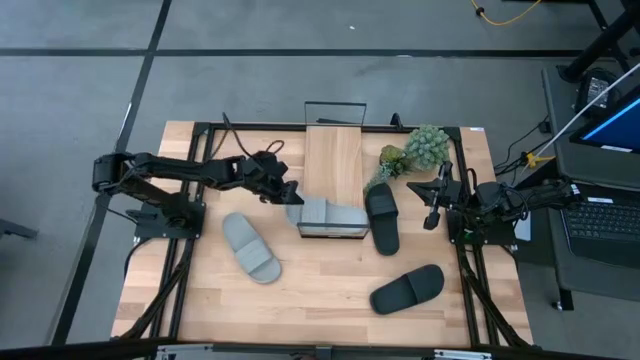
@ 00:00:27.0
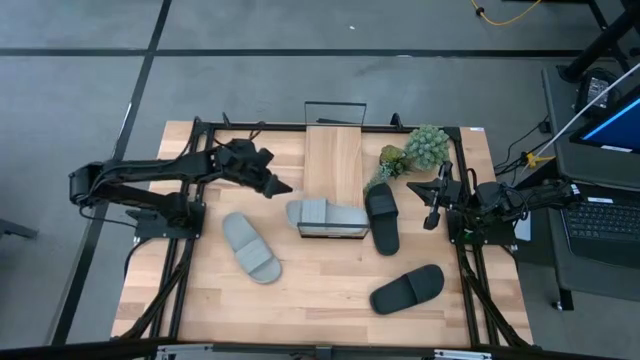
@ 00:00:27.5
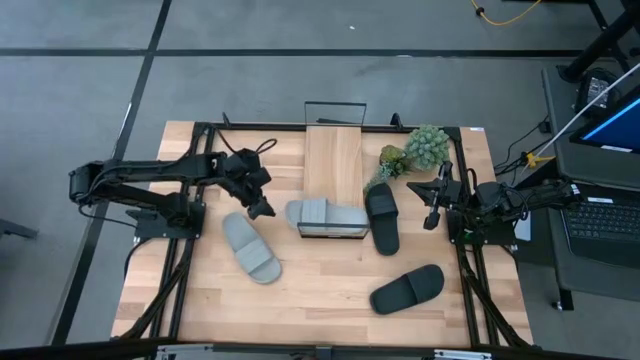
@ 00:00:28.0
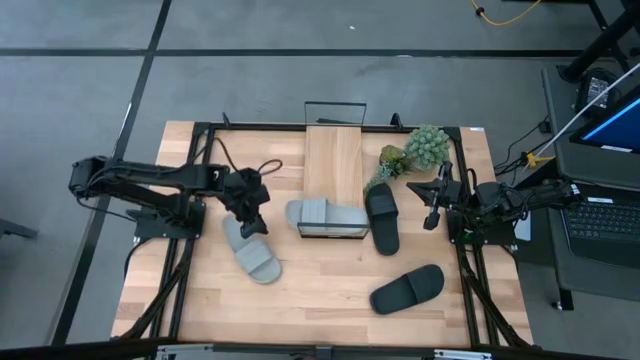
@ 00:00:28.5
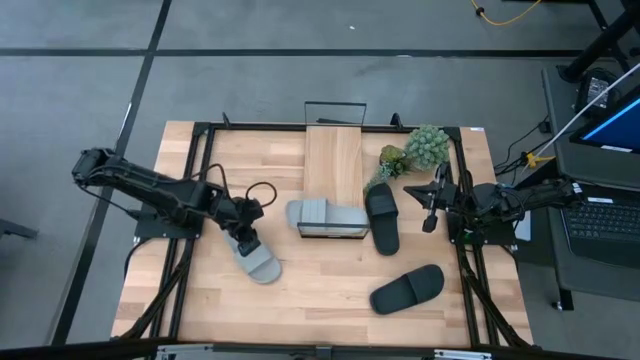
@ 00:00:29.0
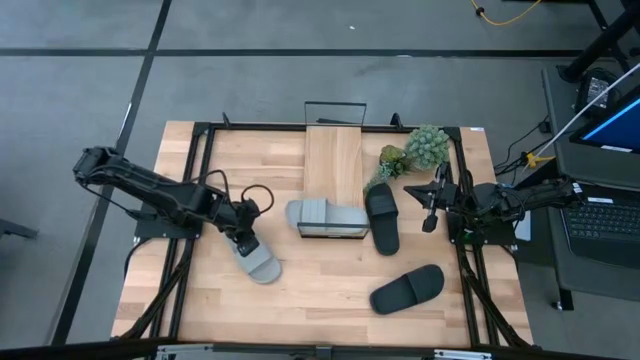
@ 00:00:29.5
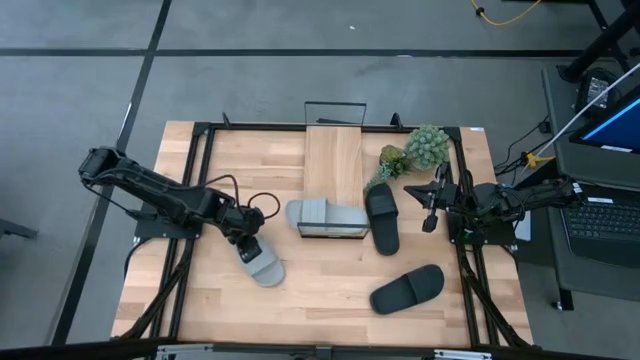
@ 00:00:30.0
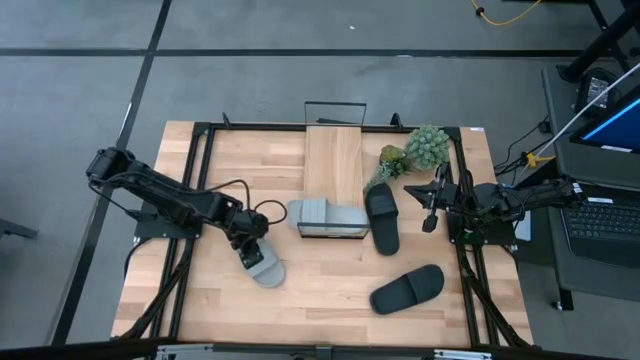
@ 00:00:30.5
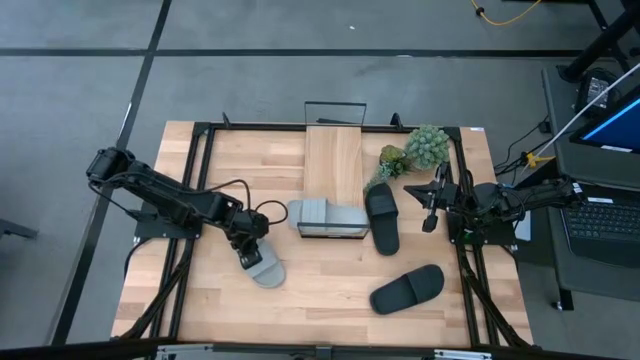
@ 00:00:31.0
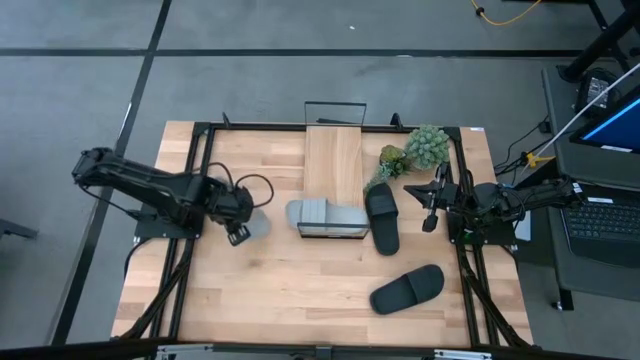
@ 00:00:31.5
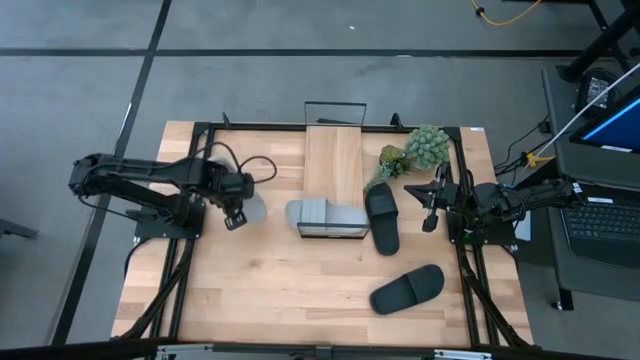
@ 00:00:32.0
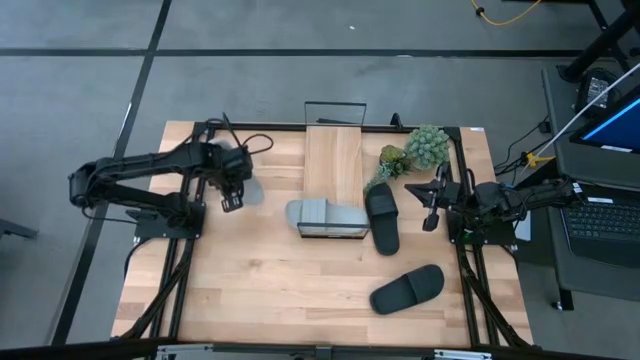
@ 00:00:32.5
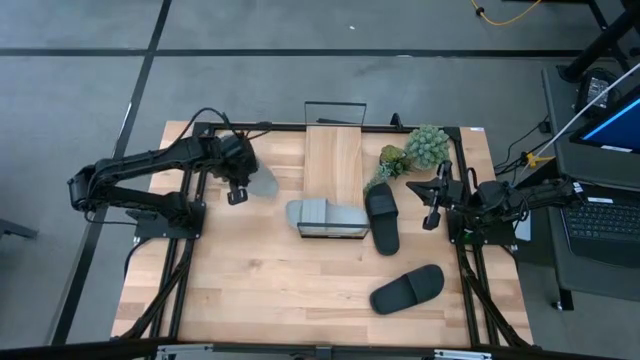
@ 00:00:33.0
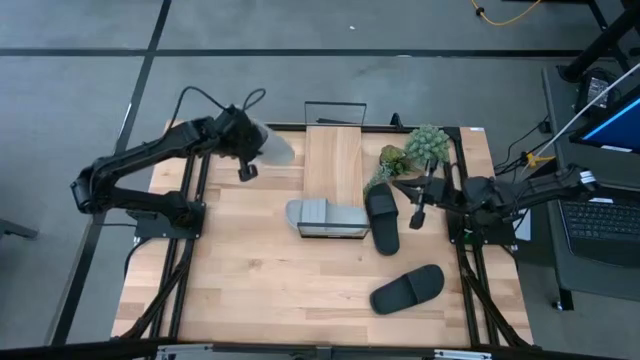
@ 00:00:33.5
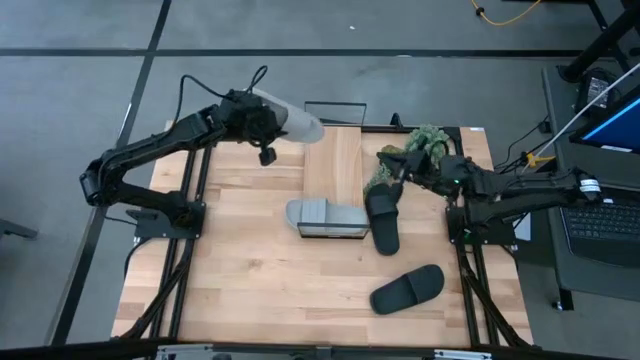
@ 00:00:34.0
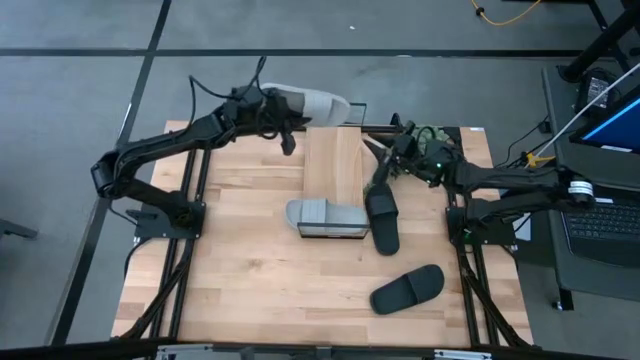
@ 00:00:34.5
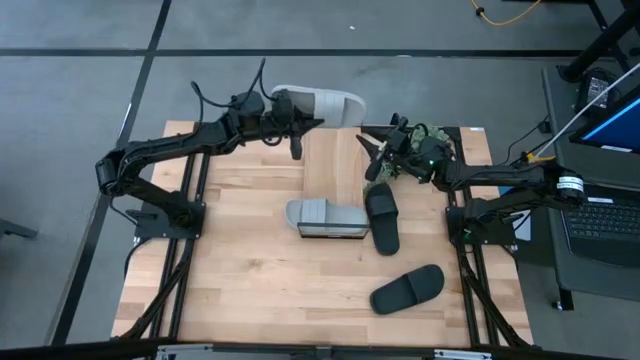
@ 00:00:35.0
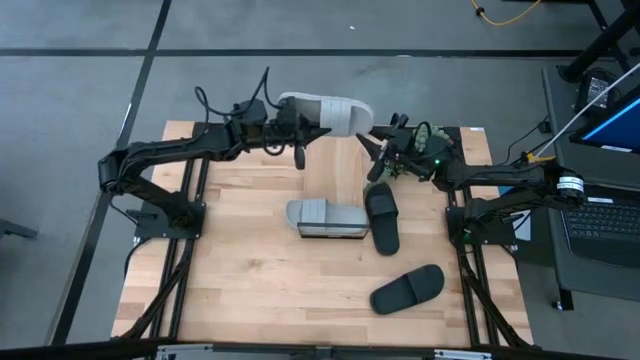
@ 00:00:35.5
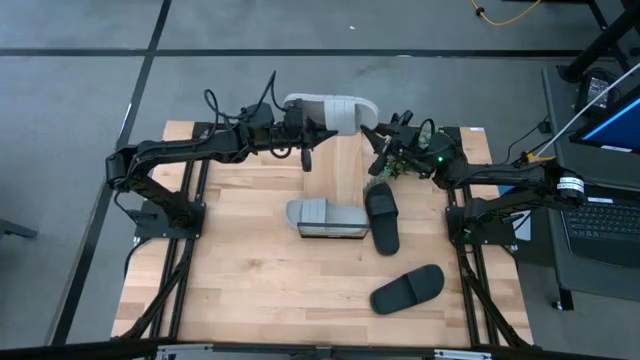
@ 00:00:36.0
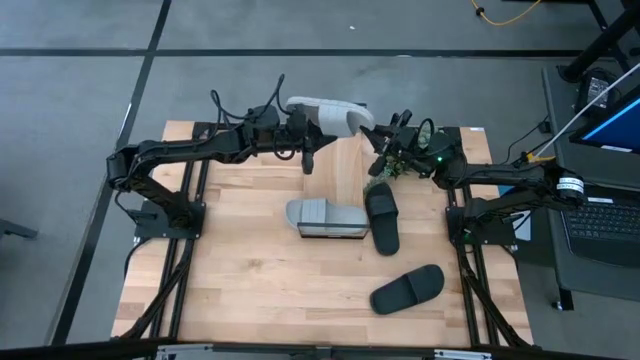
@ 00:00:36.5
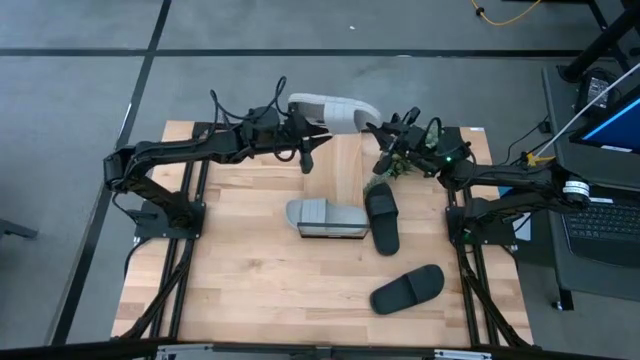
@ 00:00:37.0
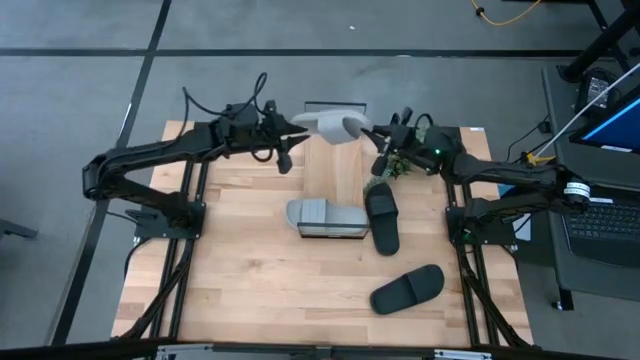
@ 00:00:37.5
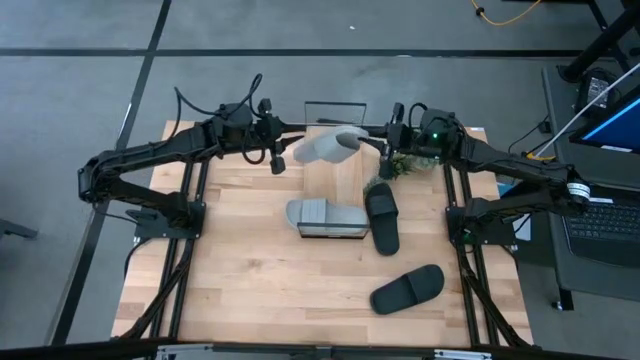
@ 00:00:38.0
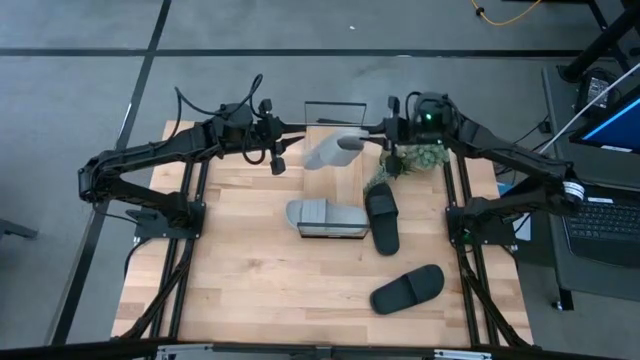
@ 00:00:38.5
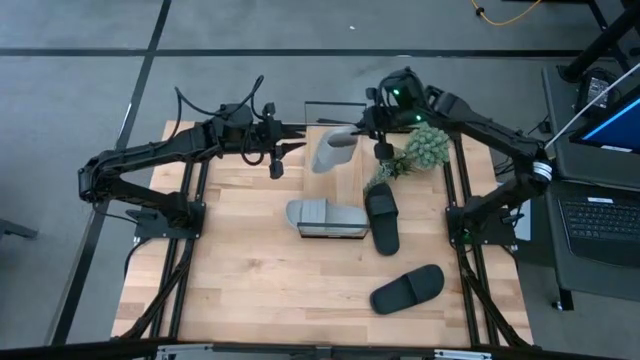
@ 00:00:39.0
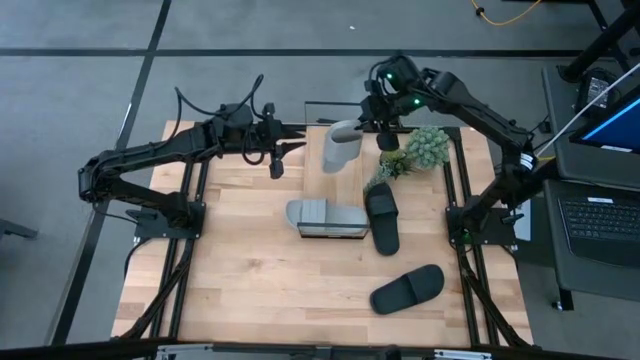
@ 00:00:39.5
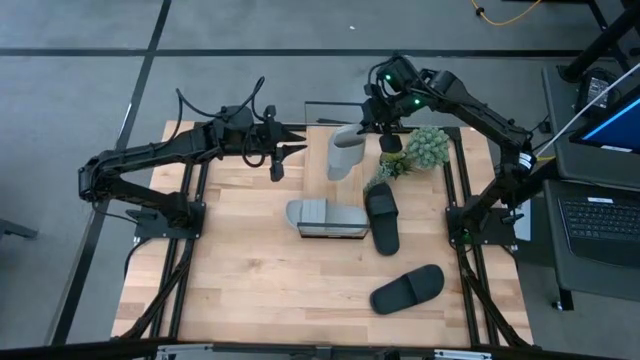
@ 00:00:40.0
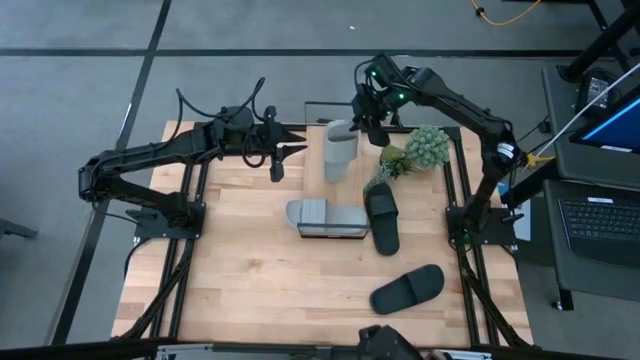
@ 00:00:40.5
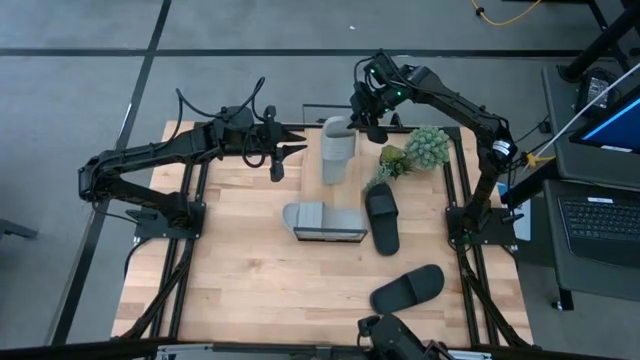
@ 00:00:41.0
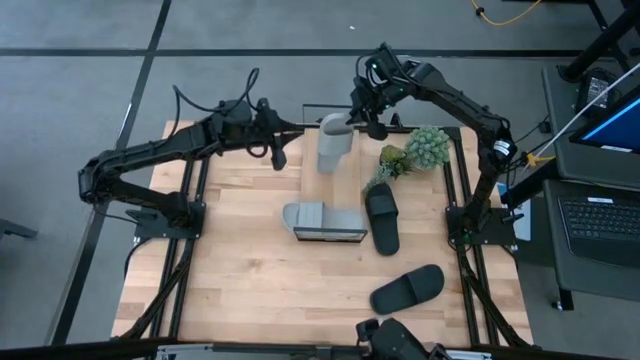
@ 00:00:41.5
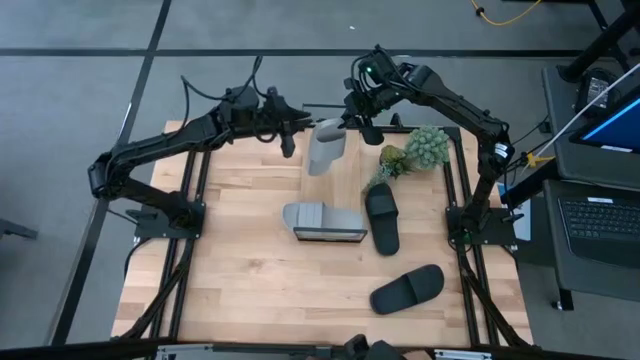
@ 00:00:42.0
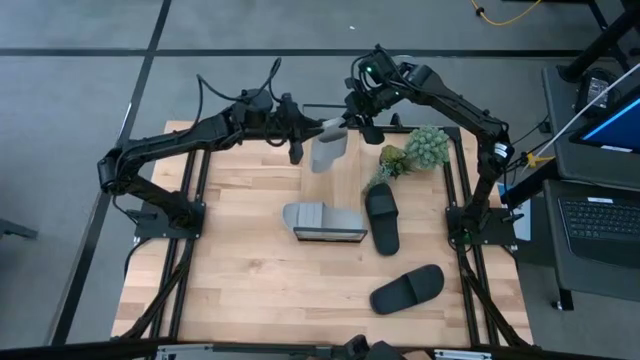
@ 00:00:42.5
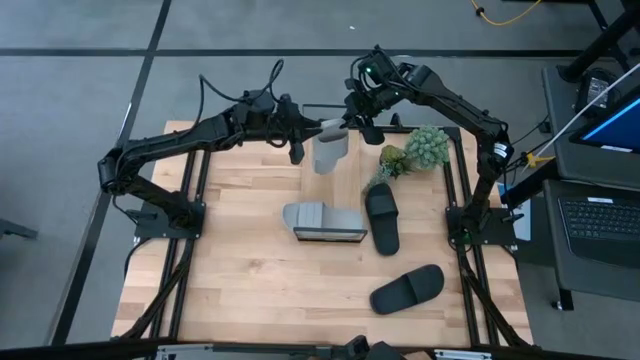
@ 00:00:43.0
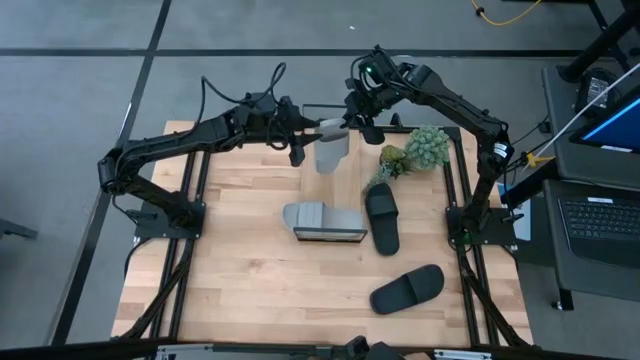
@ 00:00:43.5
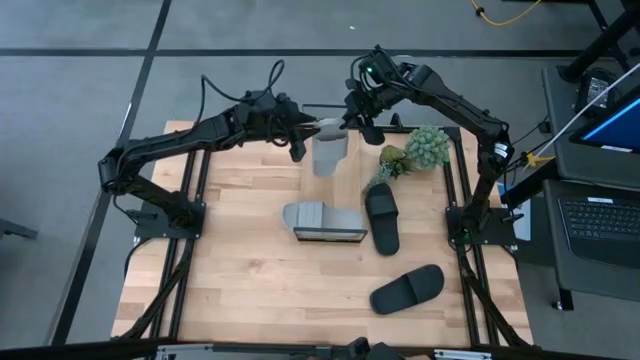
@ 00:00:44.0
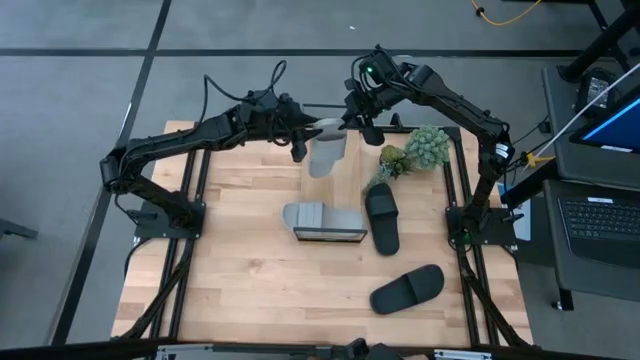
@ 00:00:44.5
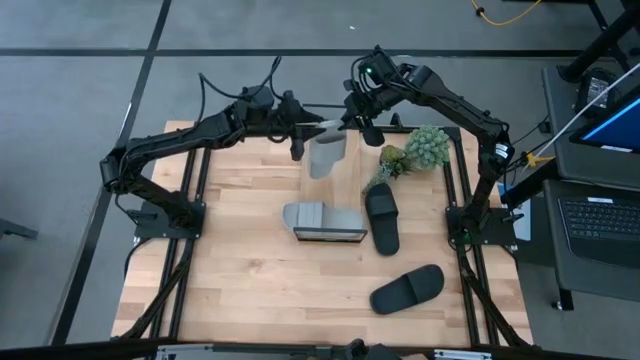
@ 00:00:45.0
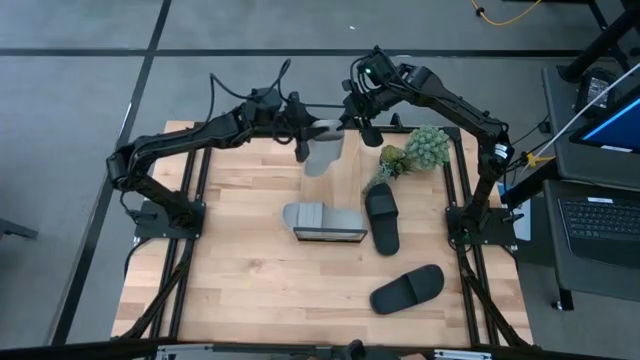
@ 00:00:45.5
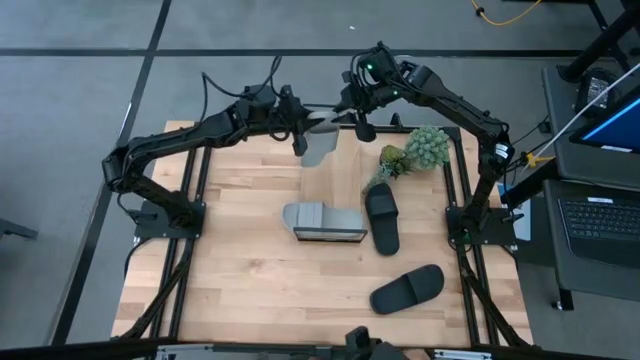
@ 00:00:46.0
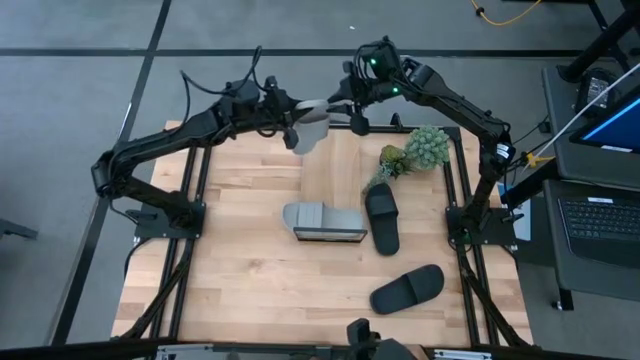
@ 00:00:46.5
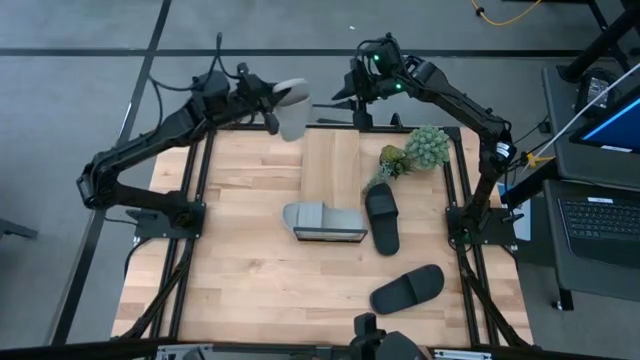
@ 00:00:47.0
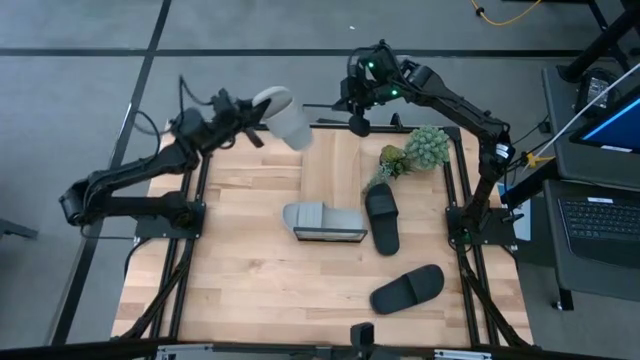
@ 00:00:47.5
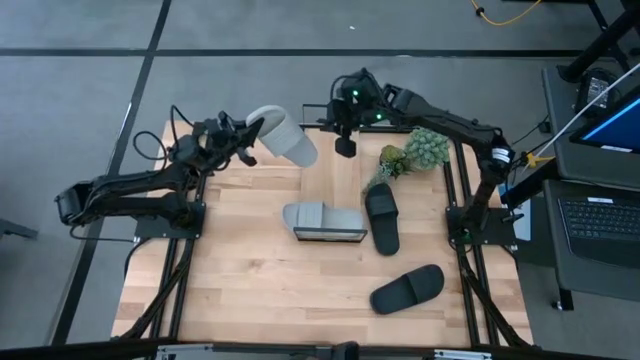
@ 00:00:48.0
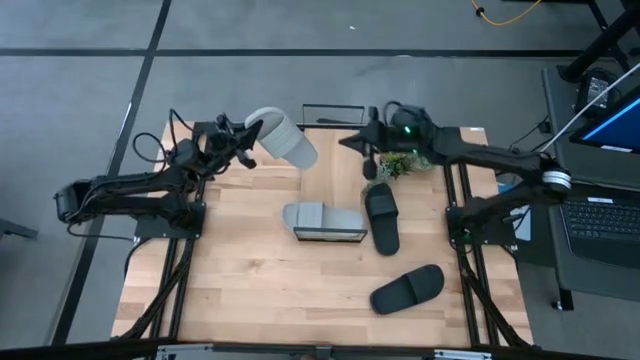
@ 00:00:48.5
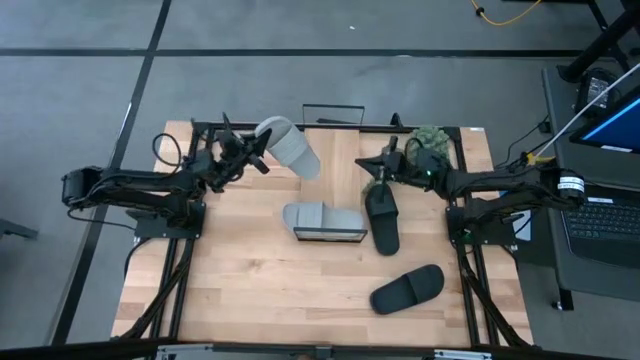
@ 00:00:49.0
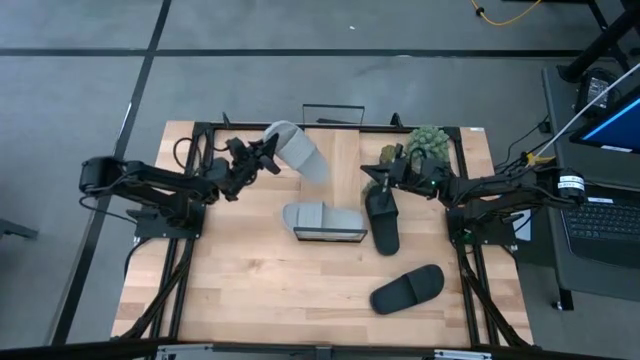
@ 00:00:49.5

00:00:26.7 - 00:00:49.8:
Task: Pick and place slides into the shelf
Put the gray slipper on the shelf
